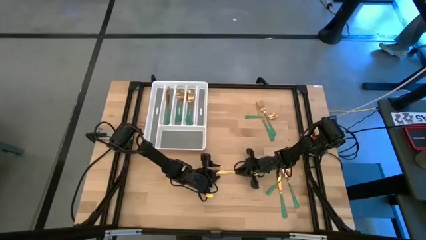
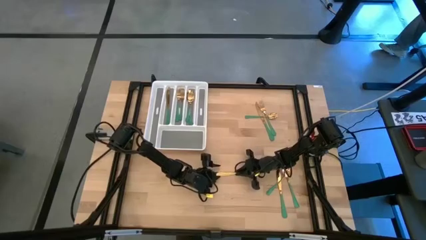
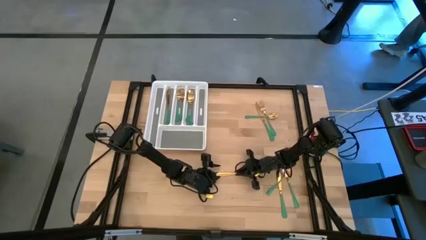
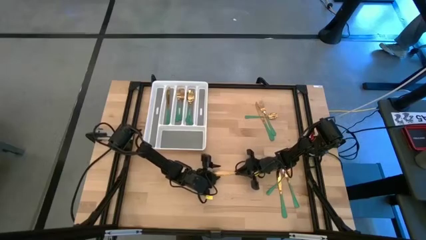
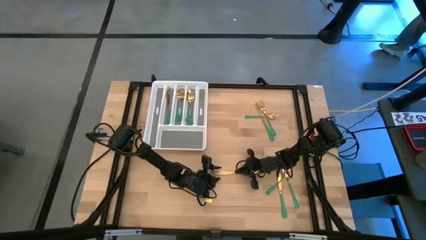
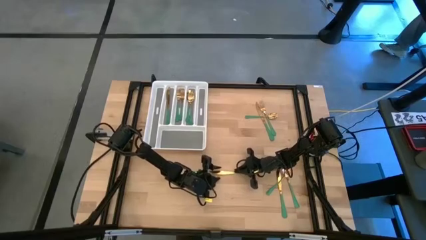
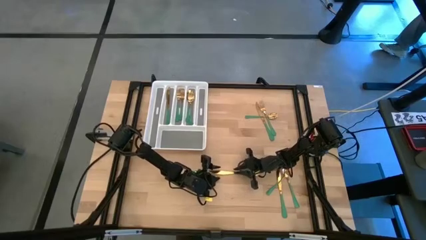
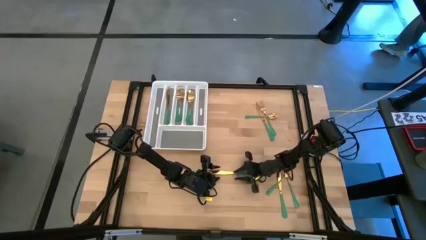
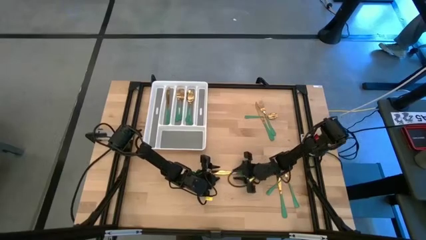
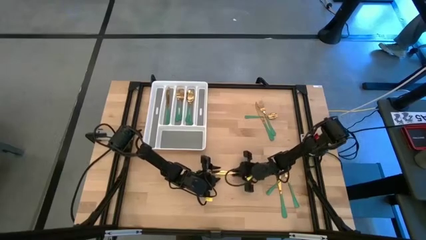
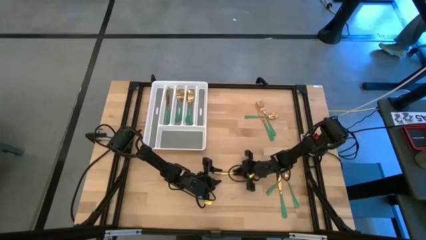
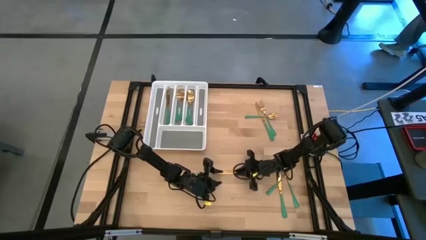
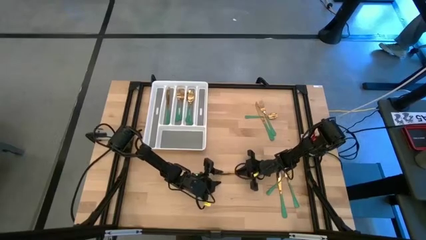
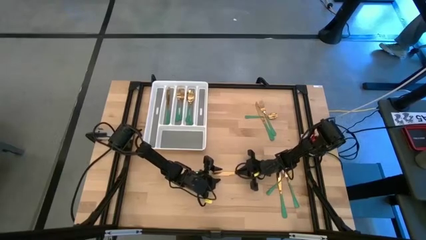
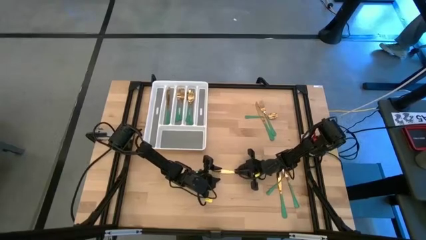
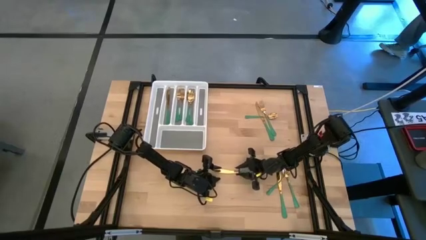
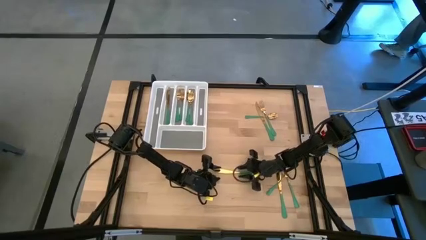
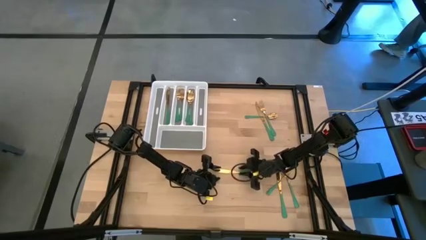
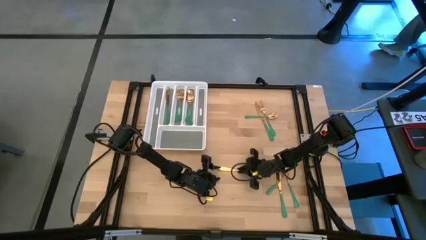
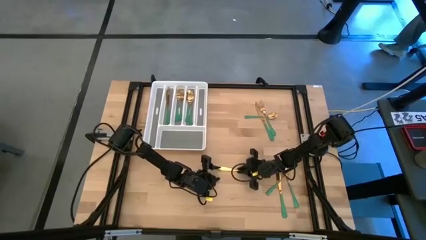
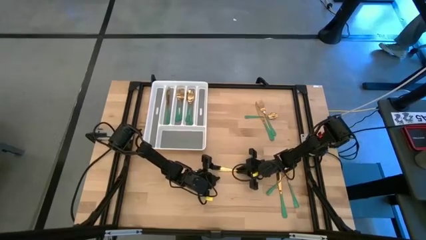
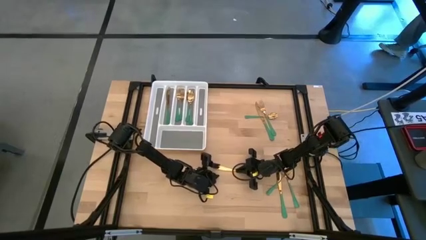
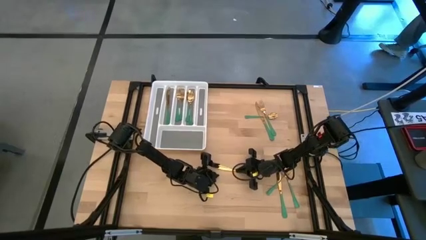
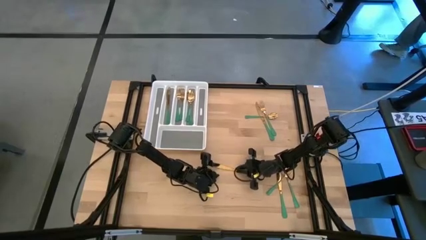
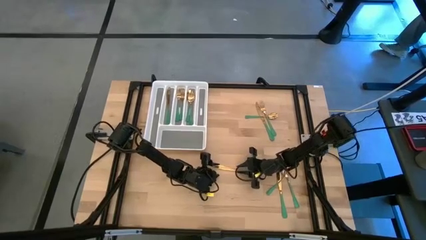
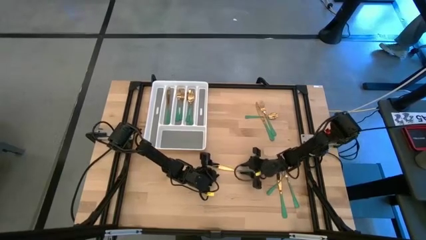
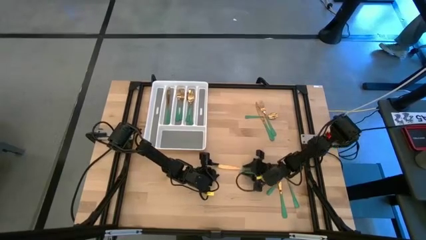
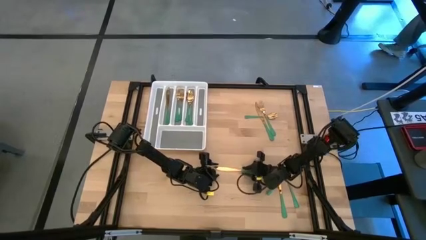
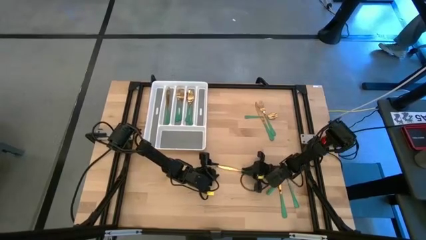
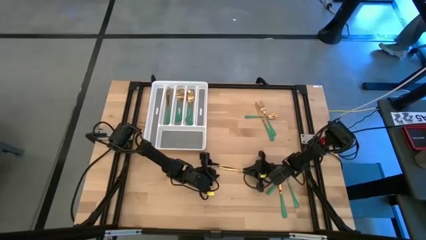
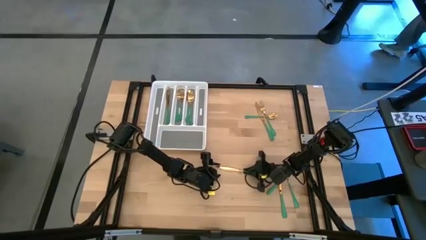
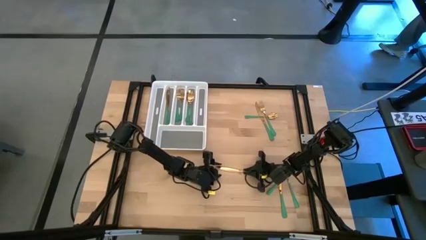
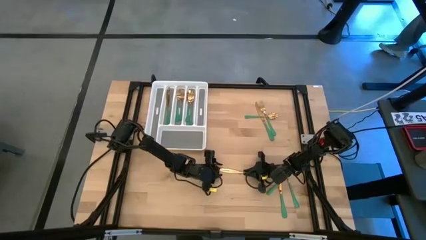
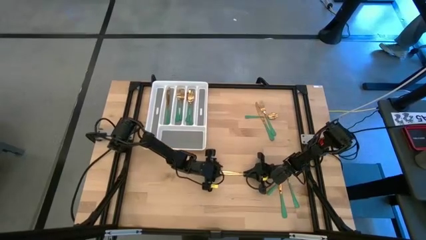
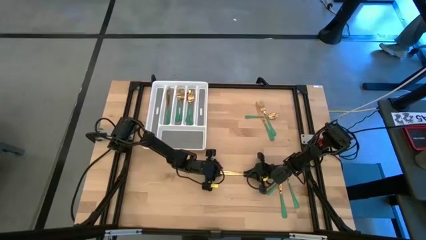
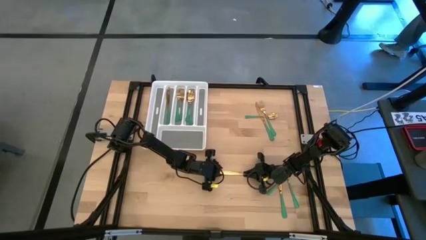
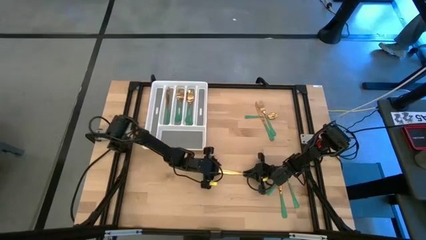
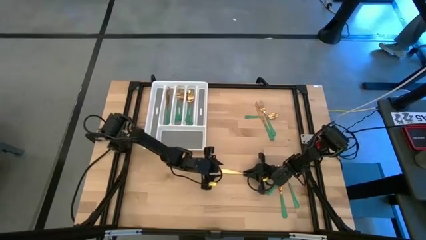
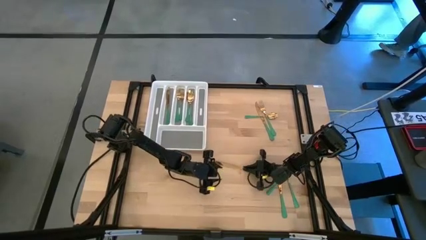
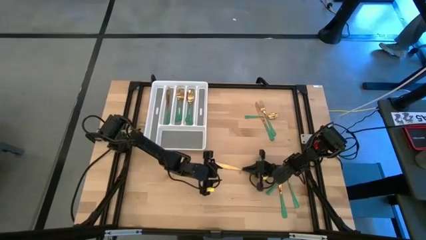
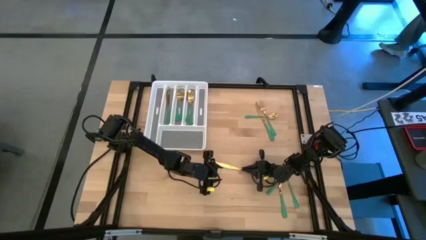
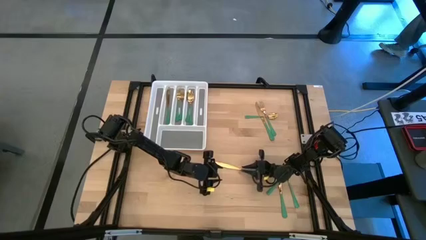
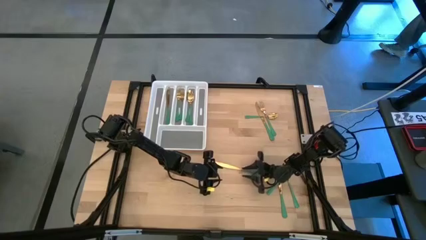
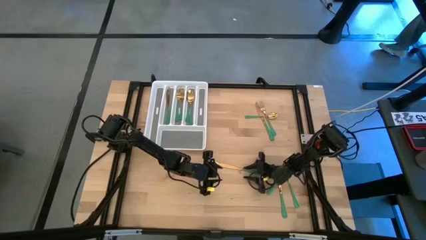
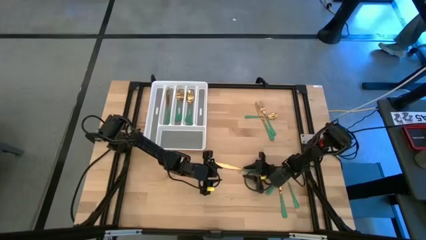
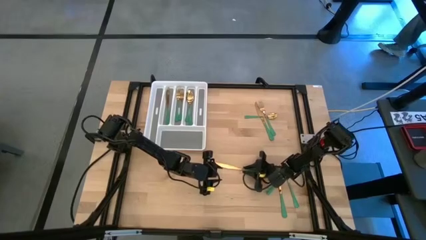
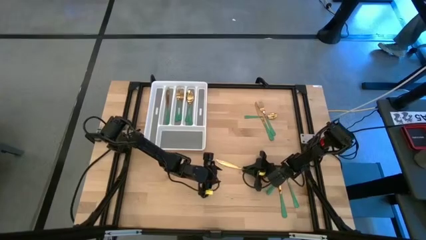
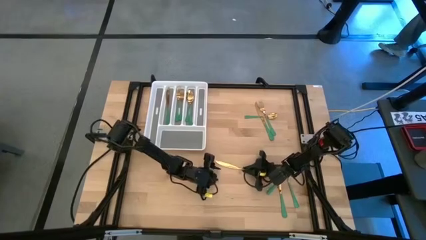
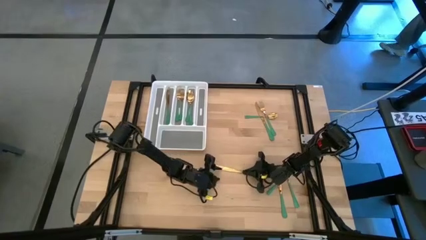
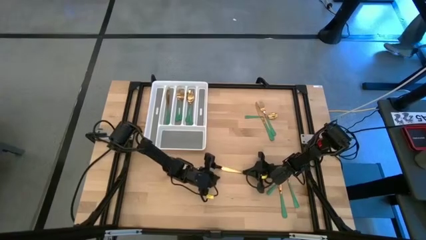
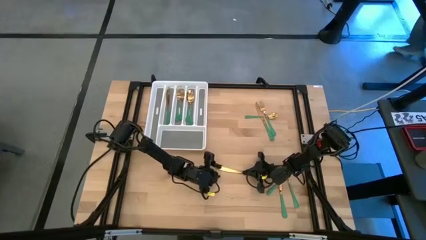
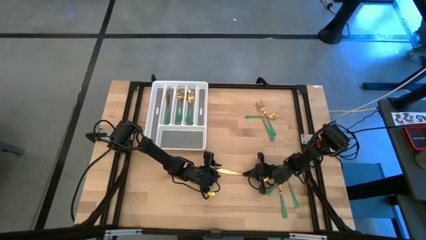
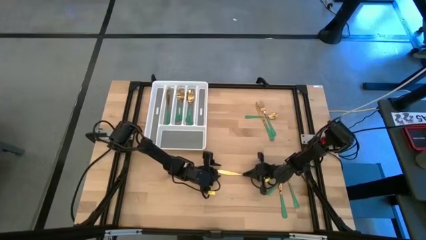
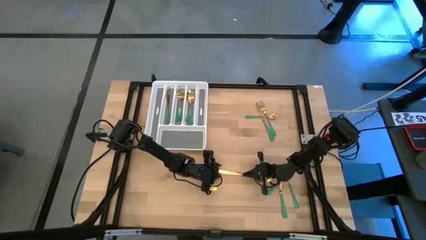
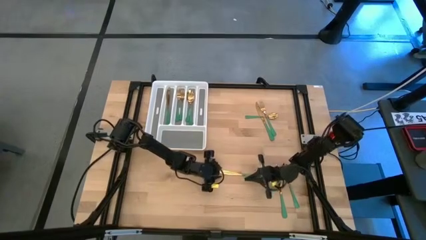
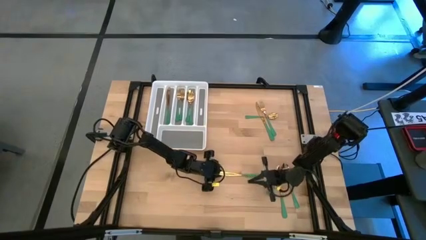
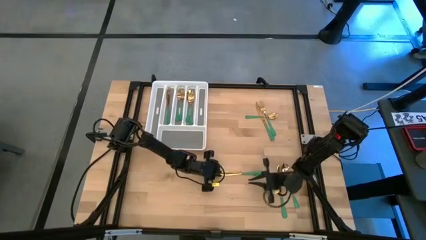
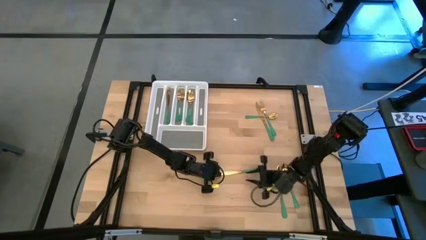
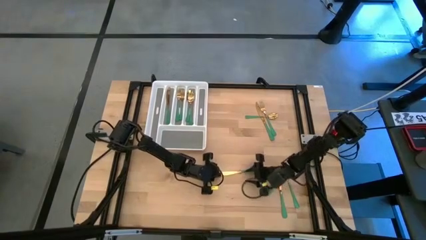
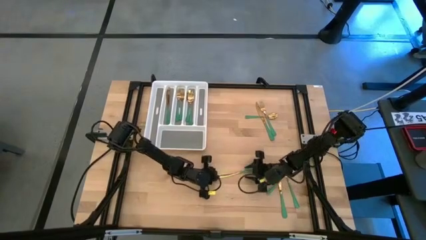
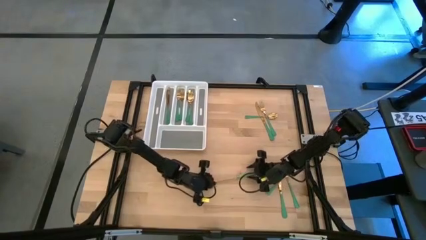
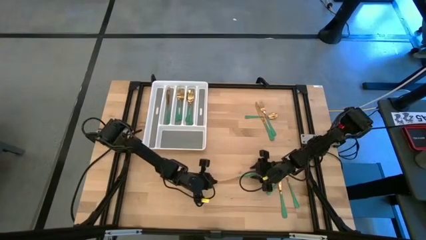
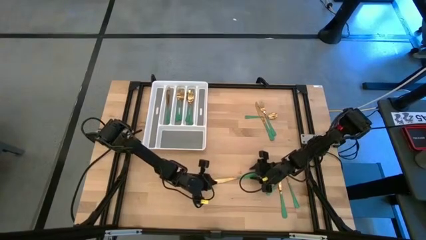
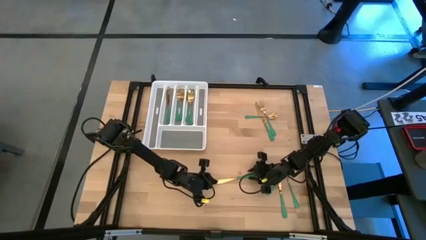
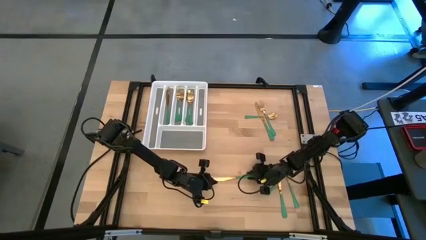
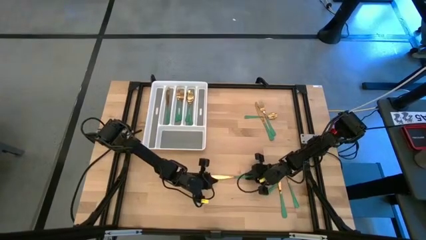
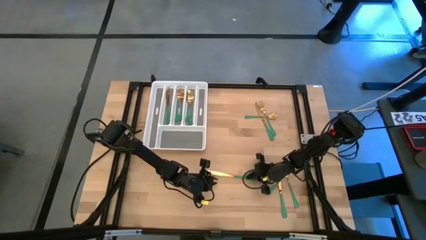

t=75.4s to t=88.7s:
Task: Sort silverware
Put the green knife into the white cutlery tray
